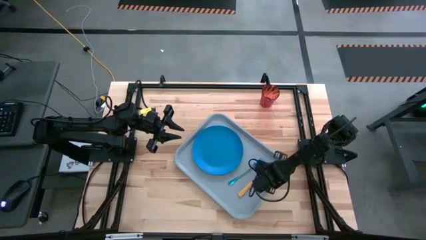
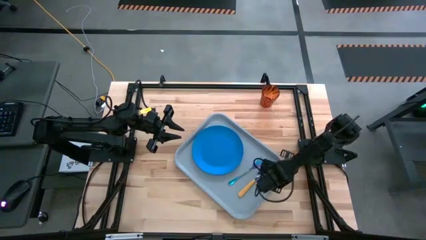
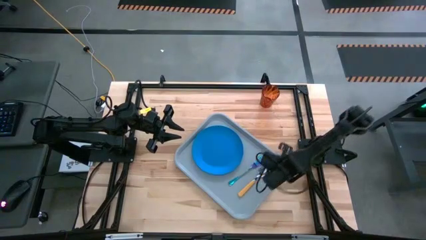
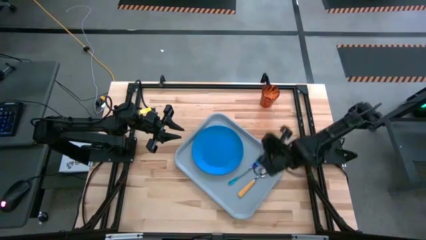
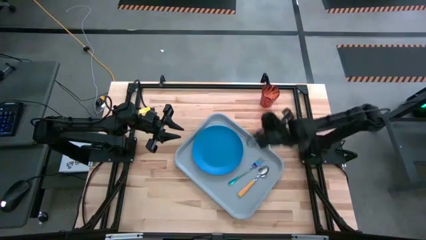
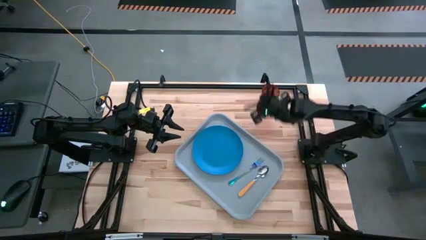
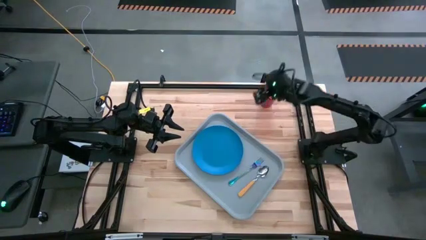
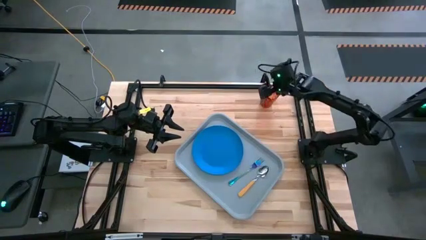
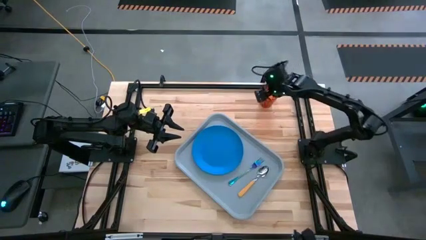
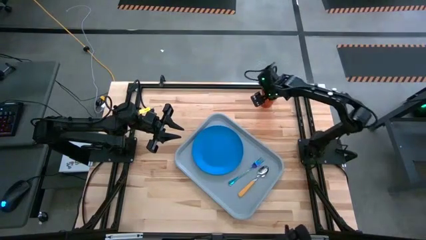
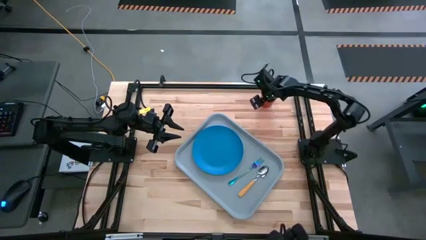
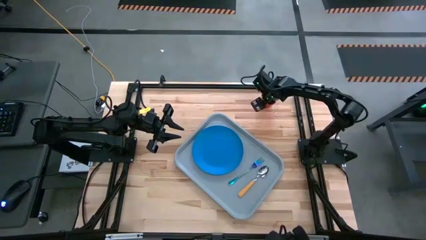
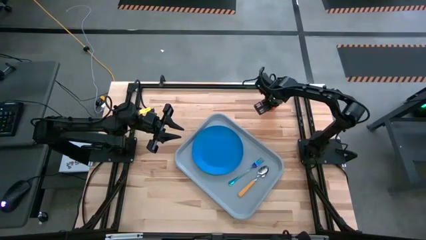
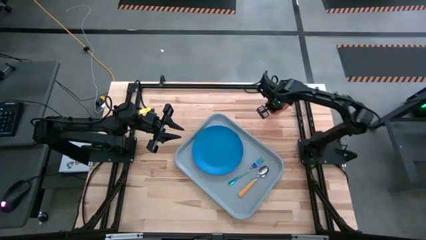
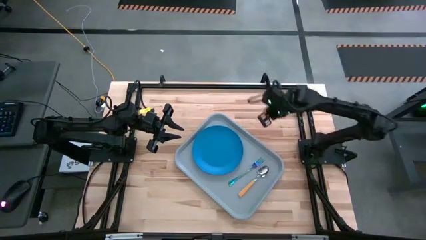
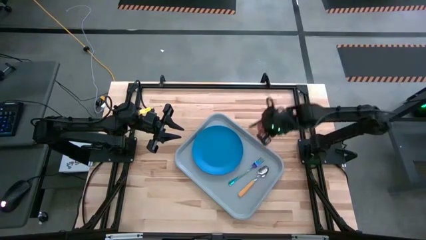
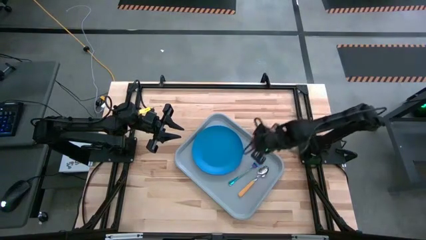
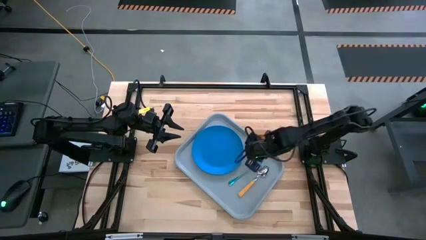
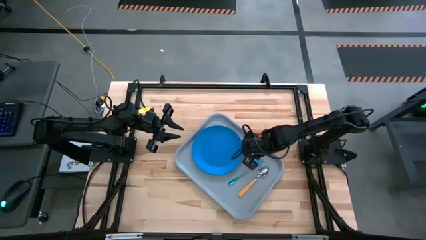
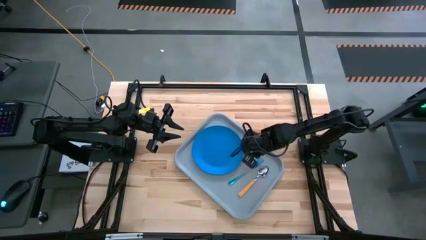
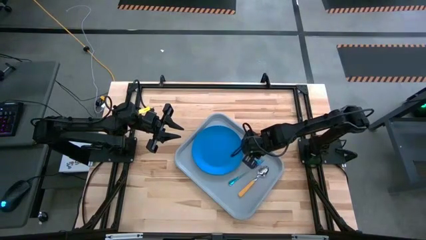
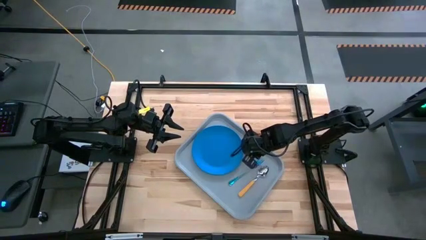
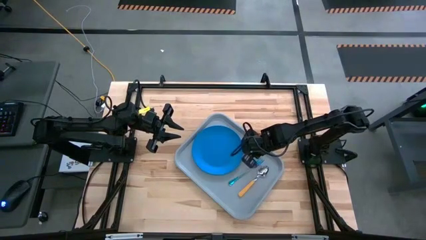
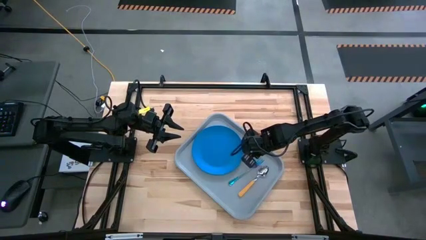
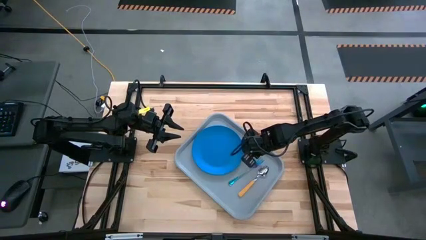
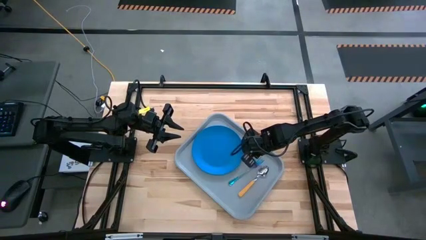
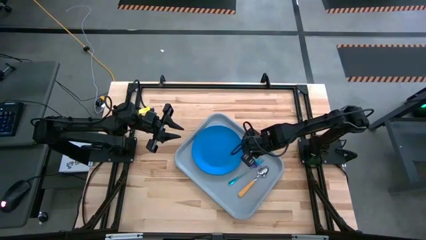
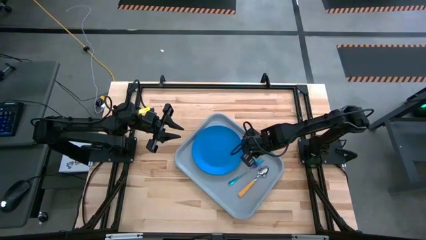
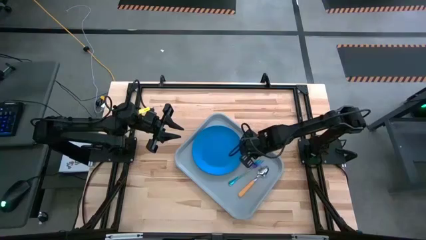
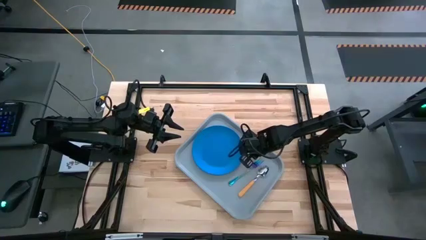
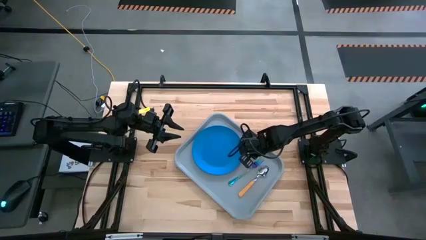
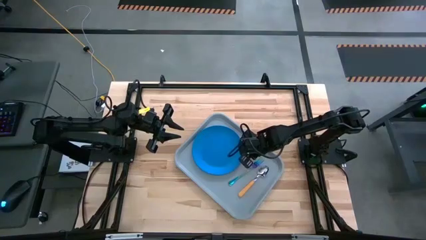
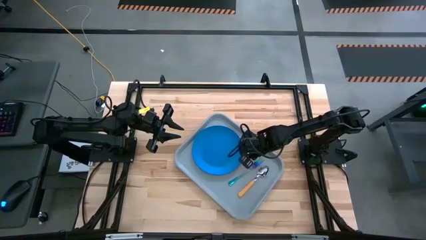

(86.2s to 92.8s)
Task: Pick and place plate/cup/fork/spoon on tray
Put the orange cup on the middle top of the gray serving tray
